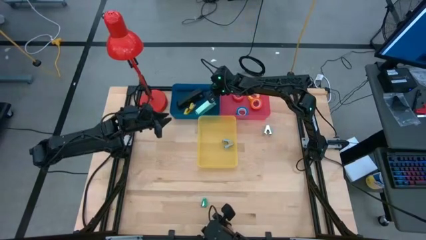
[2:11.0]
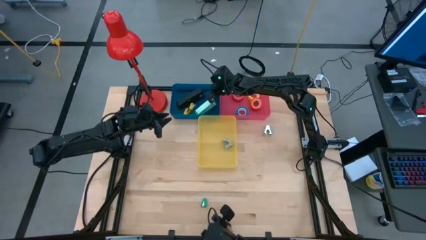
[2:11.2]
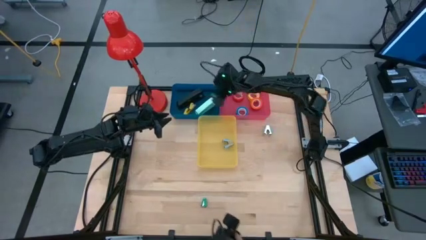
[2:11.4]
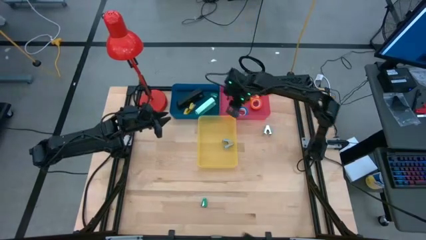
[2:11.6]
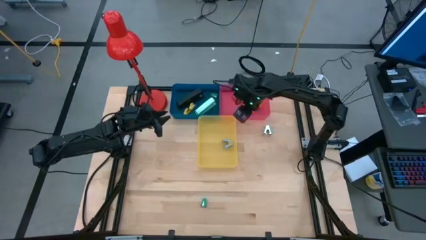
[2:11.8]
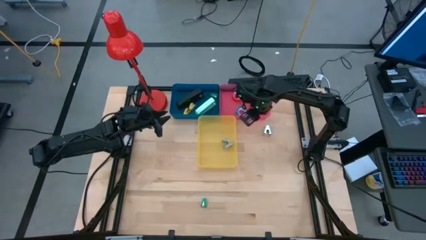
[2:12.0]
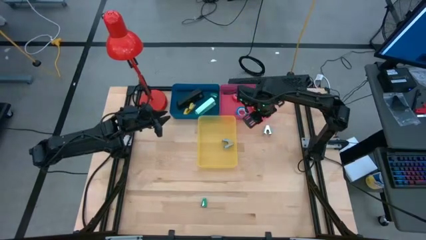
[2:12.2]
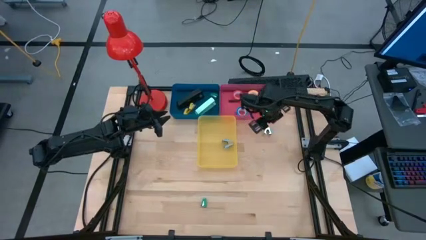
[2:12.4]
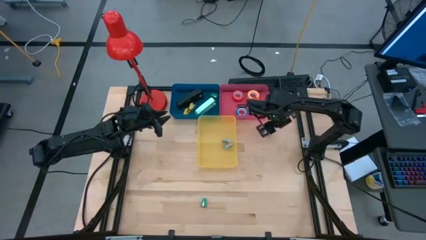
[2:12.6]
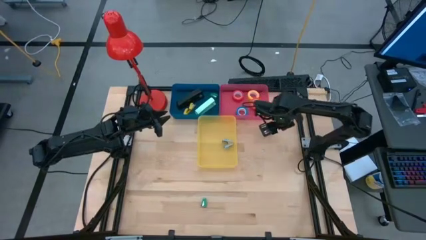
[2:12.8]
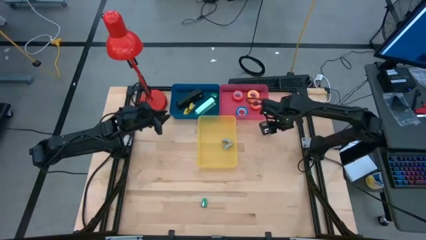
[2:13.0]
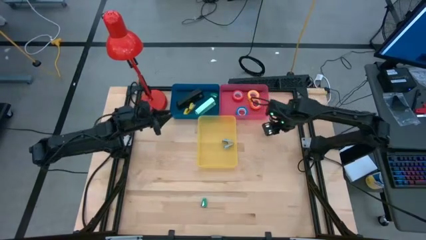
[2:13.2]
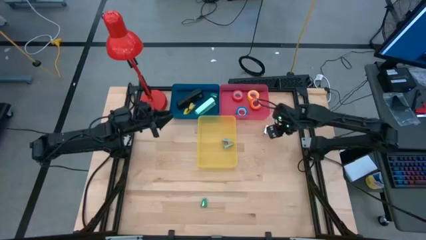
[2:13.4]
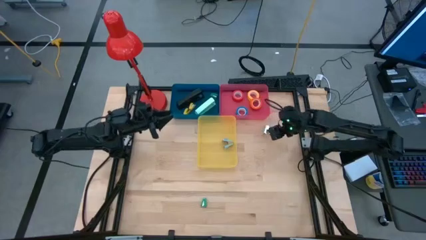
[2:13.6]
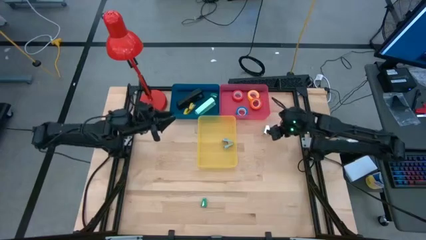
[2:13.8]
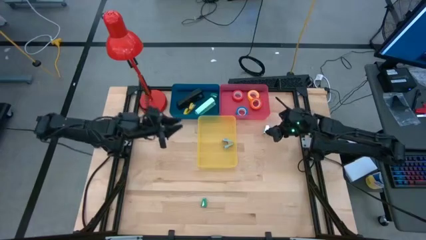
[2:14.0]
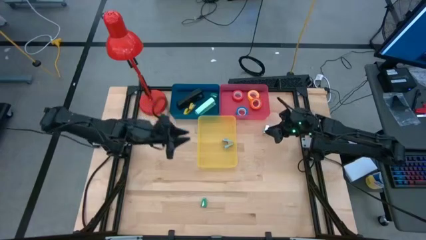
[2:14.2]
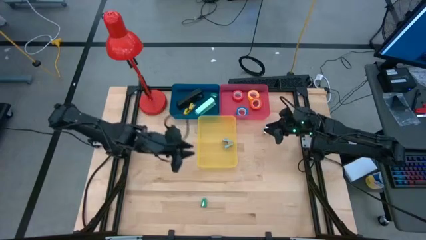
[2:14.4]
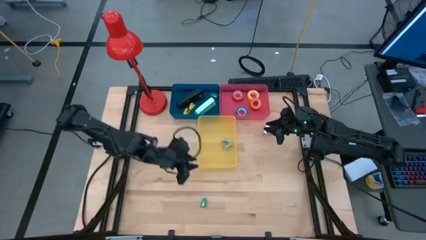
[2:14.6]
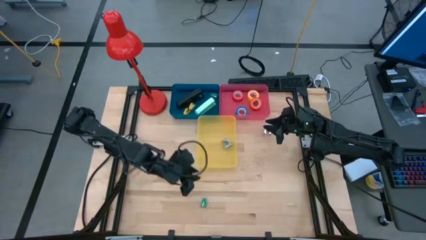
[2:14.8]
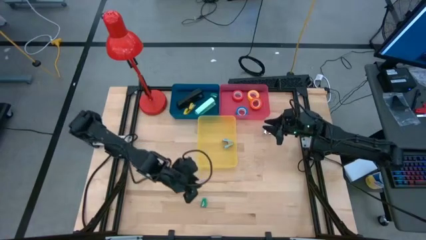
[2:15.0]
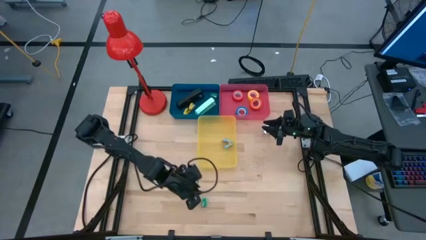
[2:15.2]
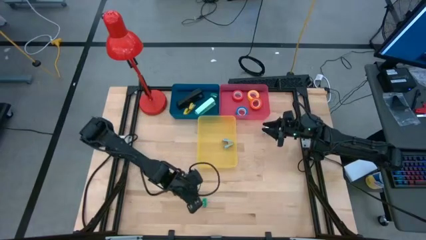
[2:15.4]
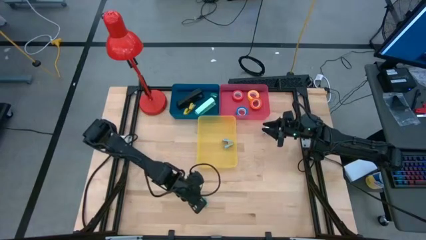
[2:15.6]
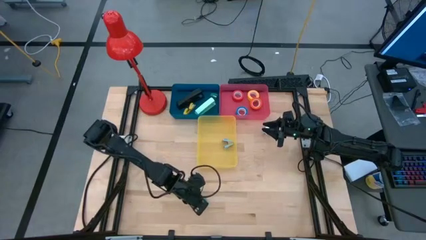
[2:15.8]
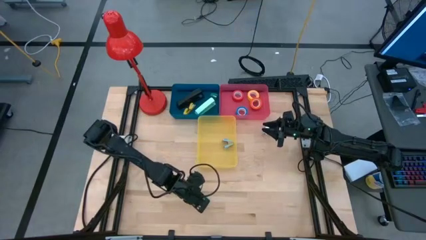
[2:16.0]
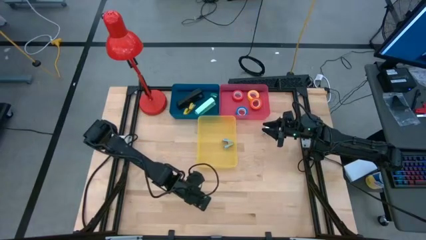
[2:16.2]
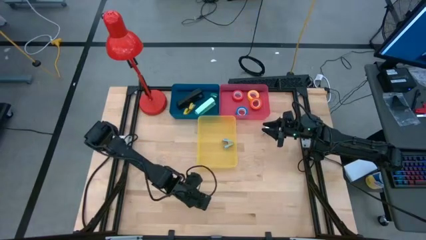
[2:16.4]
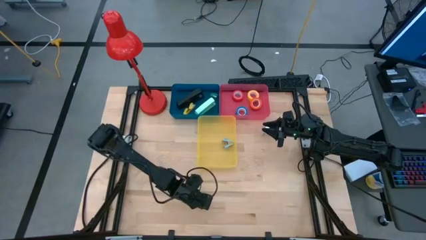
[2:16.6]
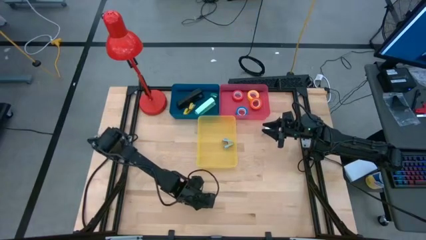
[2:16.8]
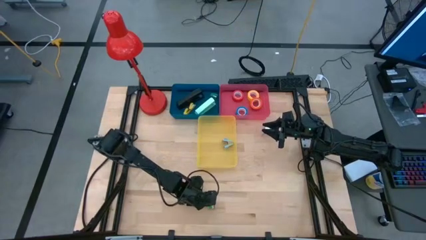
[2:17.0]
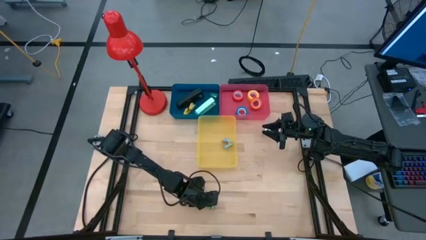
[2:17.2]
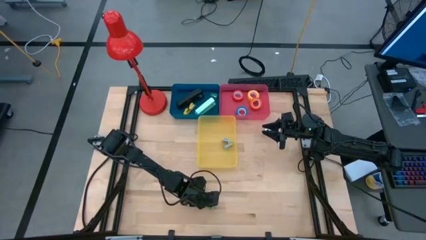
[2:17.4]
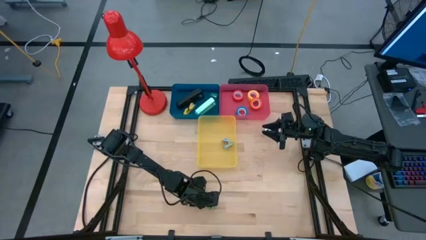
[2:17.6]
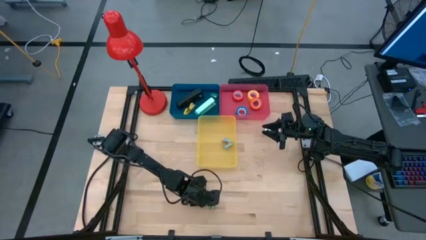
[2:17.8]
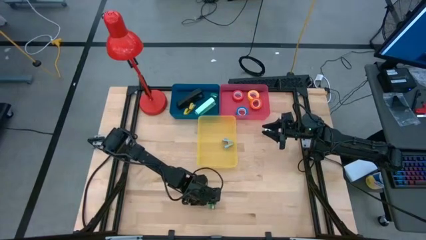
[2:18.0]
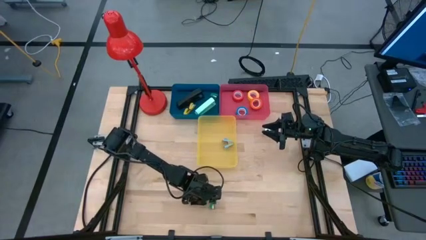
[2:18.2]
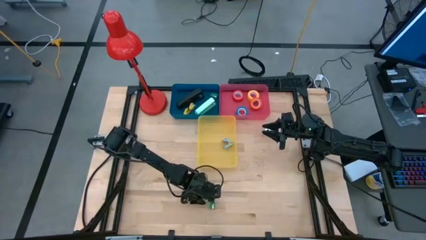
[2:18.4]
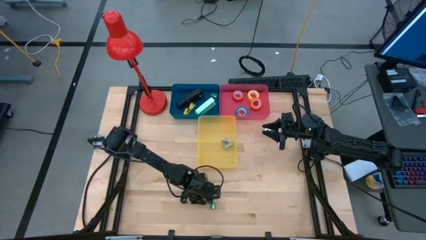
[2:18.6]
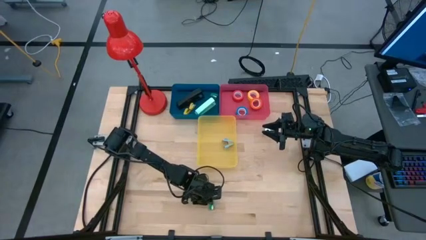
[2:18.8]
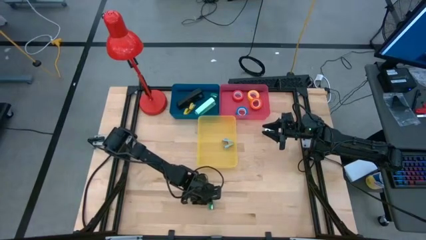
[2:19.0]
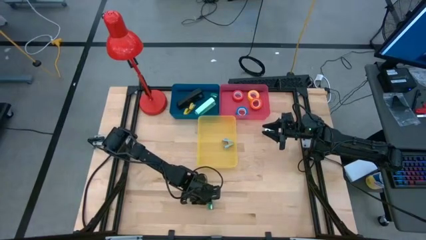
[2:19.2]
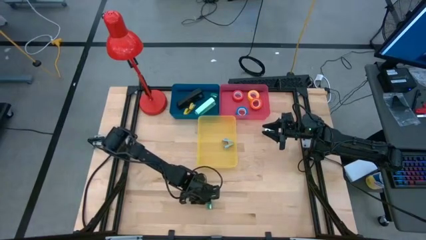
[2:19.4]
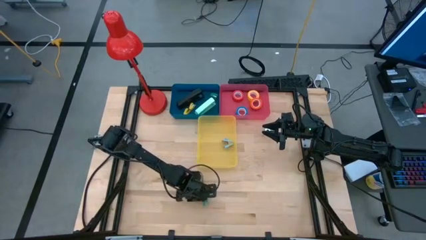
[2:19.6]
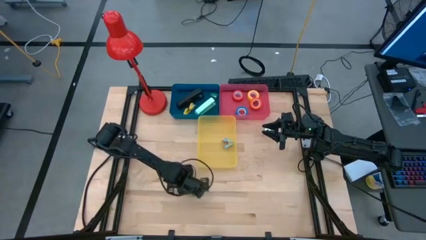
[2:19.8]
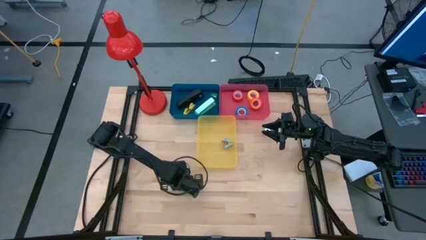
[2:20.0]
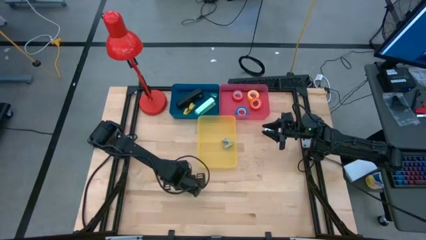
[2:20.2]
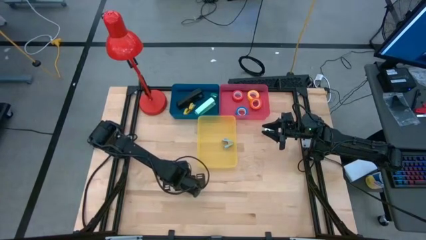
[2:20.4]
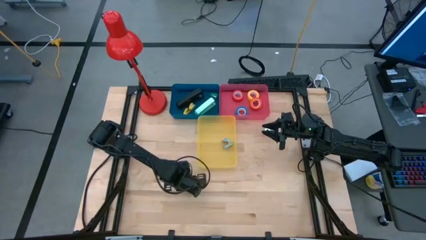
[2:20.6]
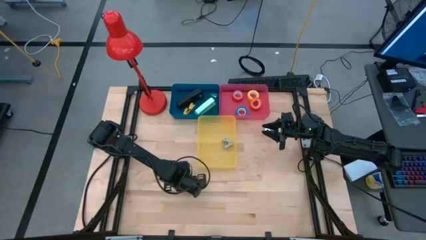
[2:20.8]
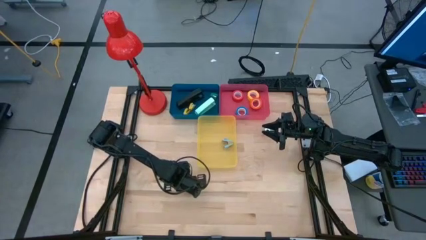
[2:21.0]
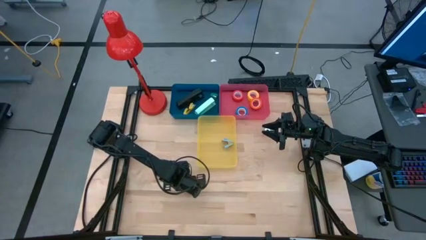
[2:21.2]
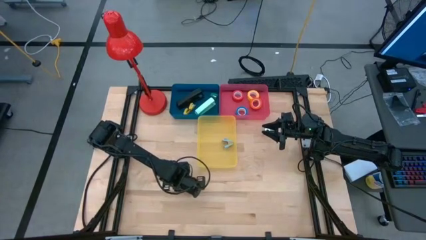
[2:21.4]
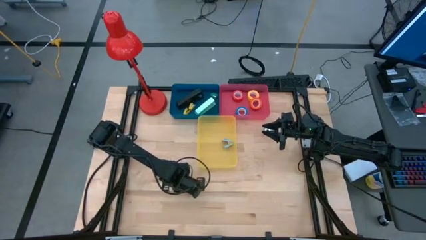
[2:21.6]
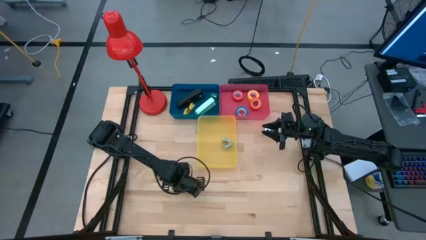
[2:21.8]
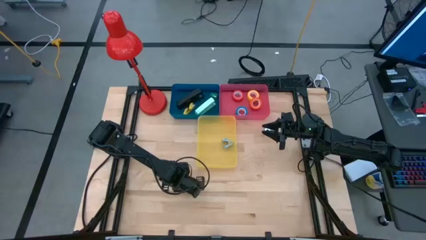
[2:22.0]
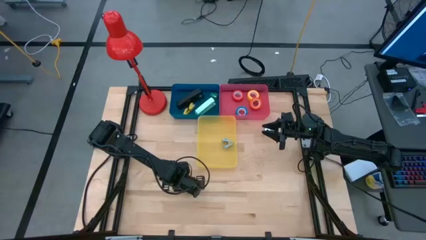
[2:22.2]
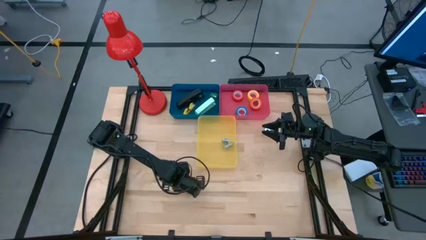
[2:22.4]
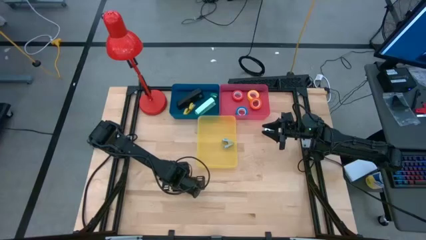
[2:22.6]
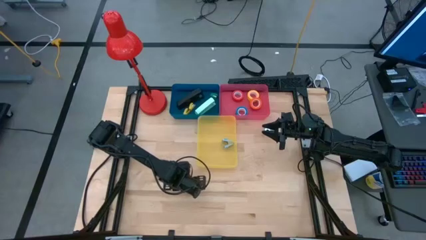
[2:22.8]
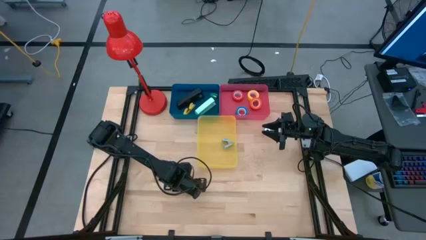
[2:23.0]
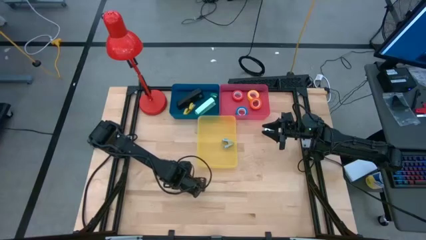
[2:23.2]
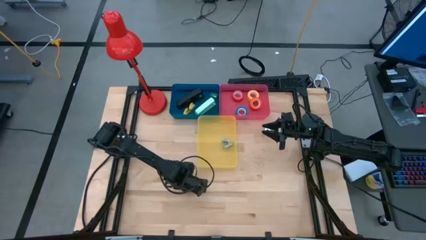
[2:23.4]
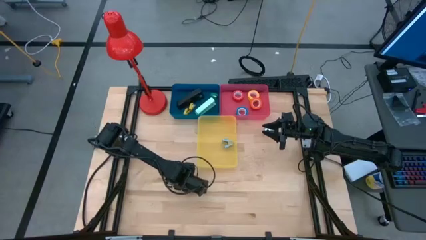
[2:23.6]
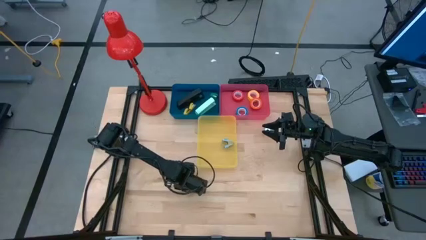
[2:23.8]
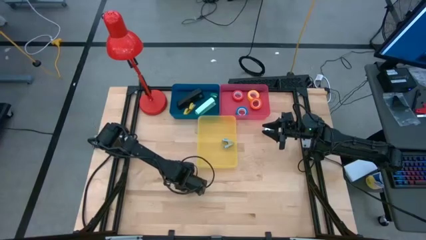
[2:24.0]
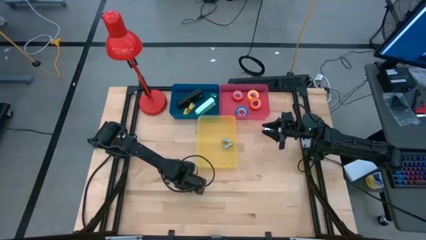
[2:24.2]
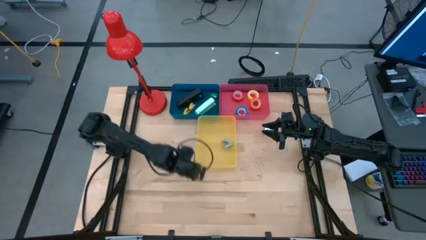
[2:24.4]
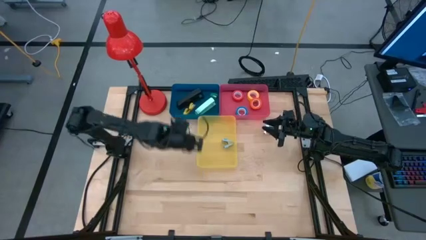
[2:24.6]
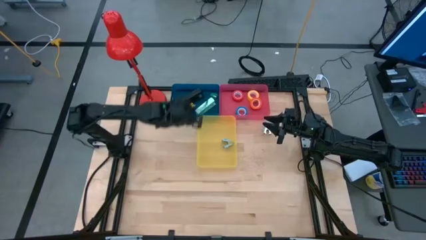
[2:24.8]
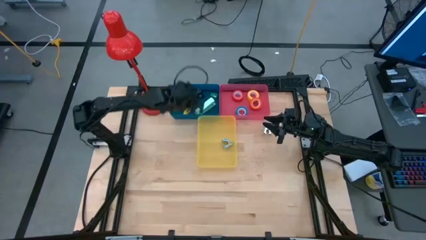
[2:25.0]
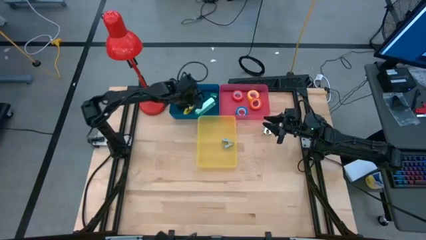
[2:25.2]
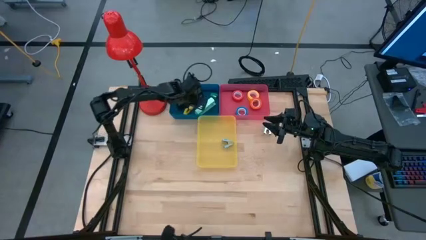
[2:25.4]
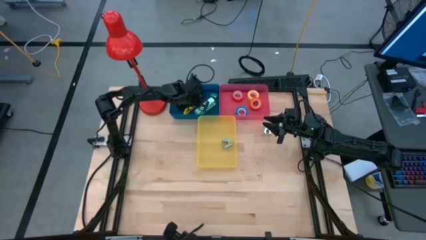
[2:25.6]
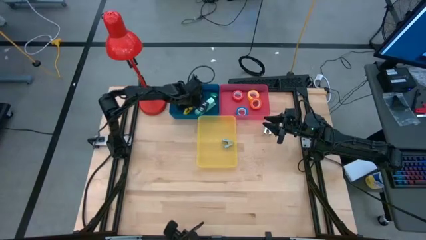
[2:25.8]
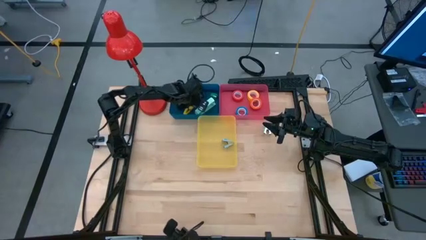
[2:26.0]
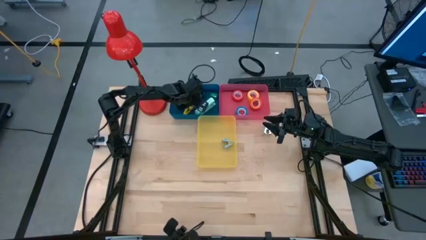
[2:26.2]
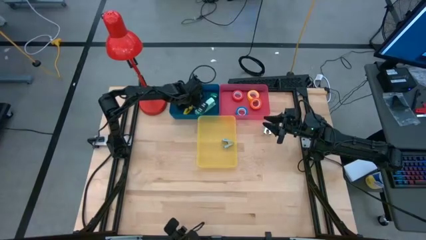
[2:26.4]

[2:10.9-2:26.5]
Task: Pick and place Stapler, Stapler remover, tape
Put the small green stapler into the blue bin

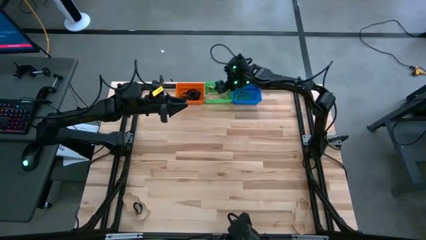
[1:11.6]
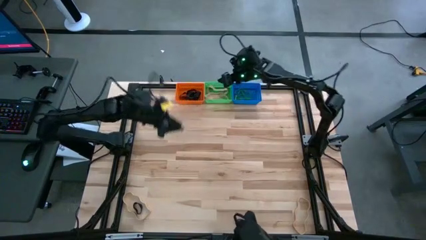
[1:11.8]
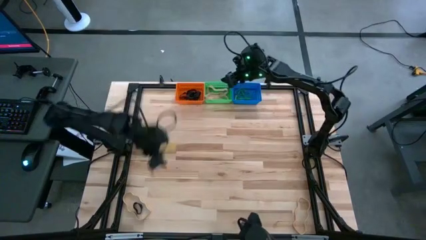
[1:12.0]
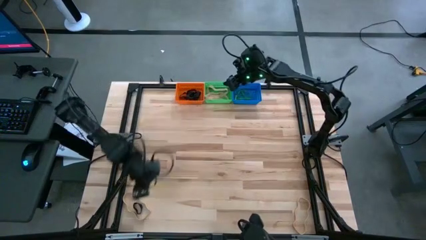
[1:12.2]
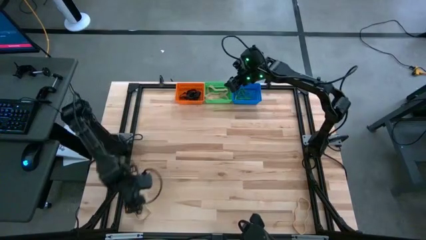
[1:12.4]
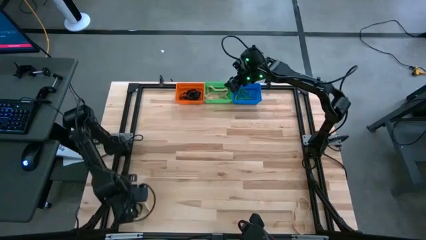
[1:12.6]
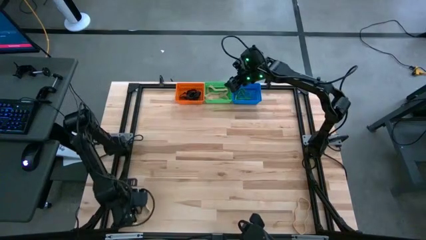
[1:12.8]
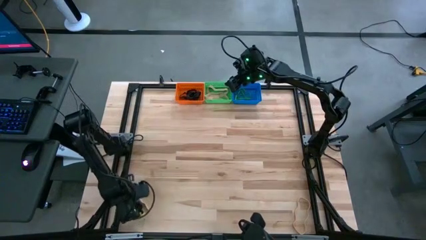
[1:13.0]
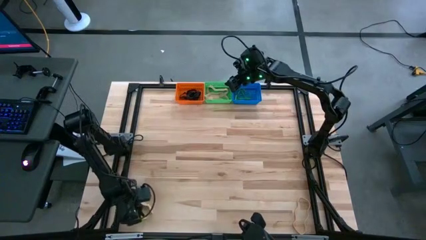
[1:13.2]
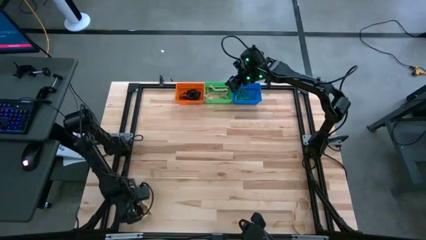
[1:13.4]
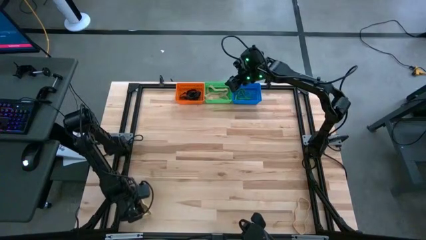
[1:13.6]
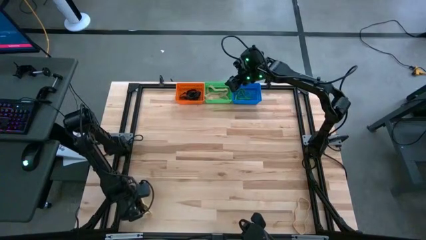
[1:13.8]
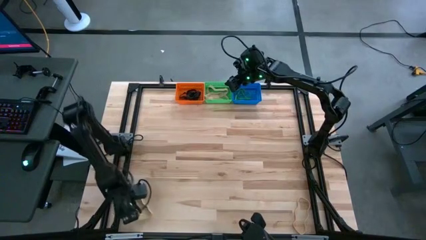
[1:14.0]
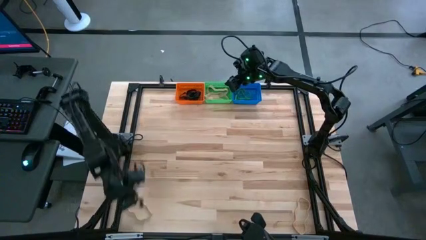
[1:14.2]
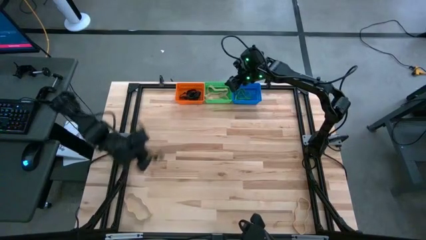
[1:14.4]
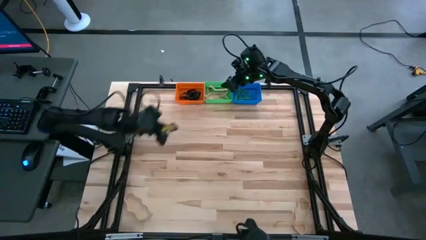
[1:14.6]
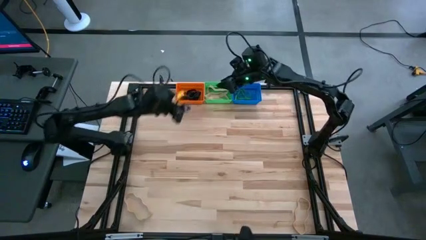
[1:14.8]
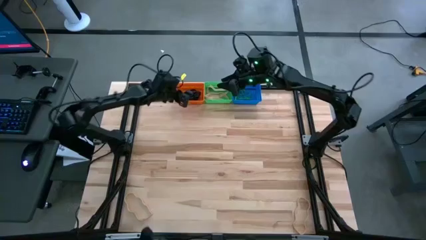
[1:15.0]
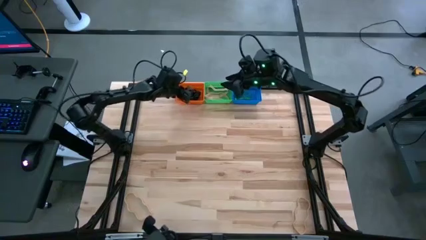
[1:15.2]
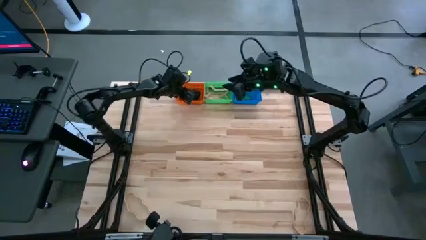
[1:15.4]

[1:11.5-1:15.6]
Task: Sort rubber bands into baskets
Put the black rubber band into the orange basket
